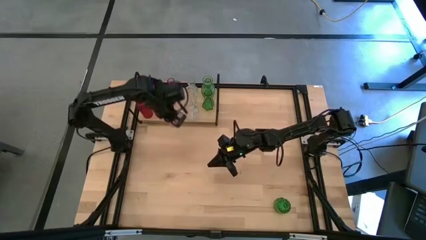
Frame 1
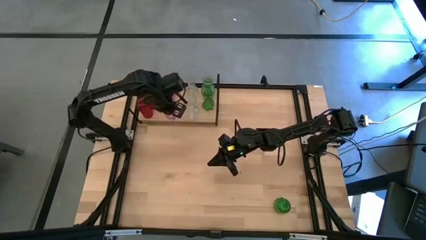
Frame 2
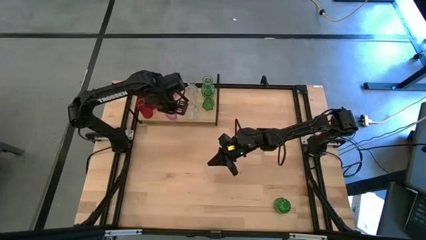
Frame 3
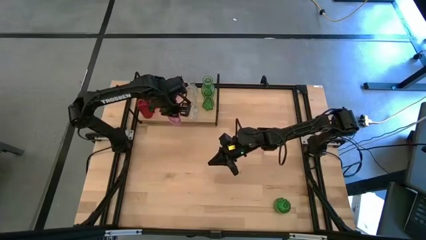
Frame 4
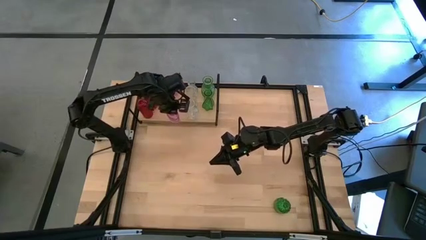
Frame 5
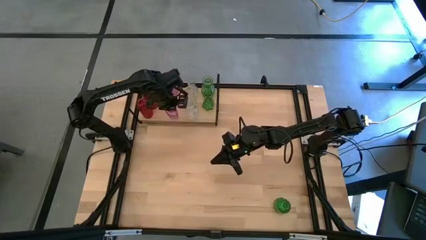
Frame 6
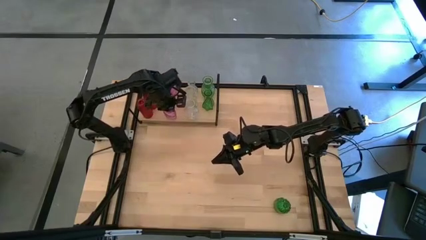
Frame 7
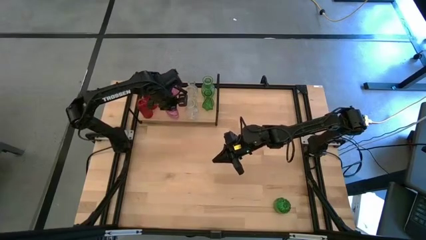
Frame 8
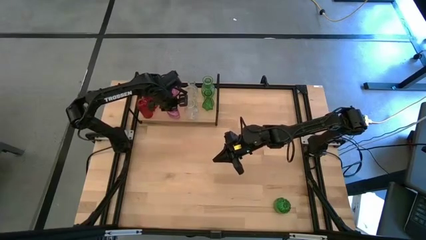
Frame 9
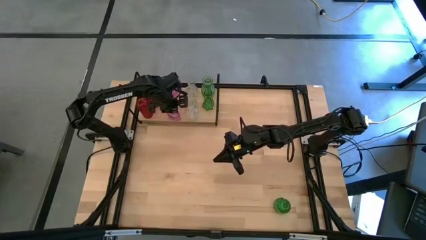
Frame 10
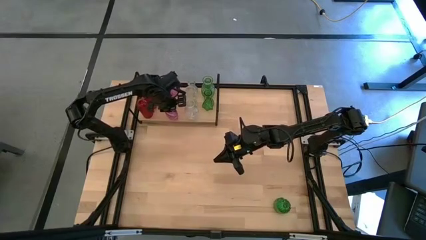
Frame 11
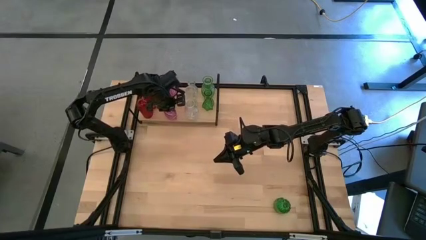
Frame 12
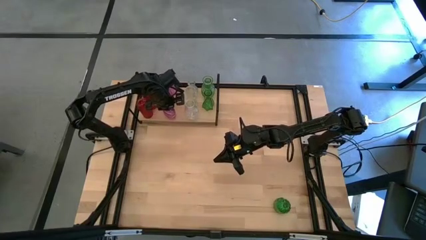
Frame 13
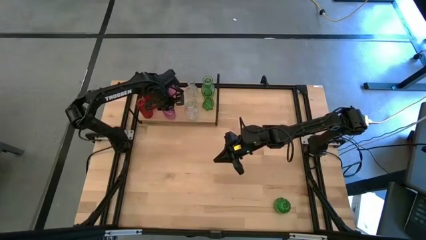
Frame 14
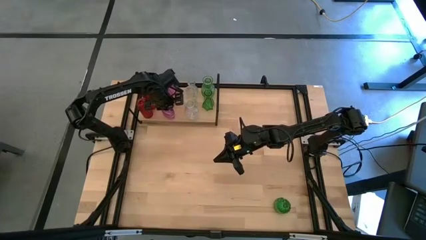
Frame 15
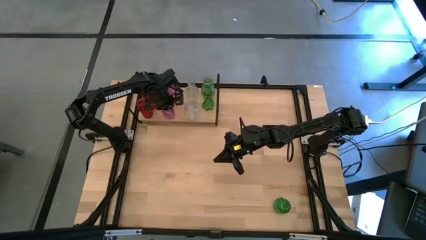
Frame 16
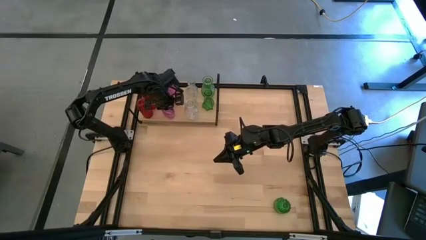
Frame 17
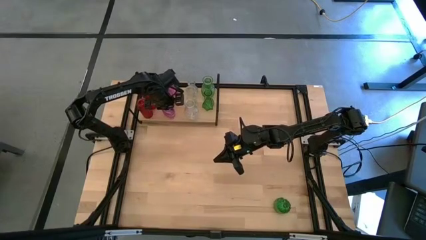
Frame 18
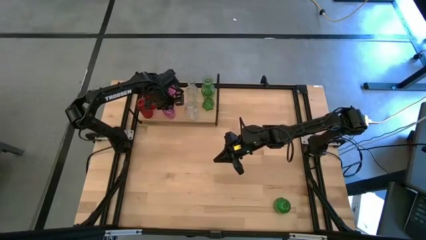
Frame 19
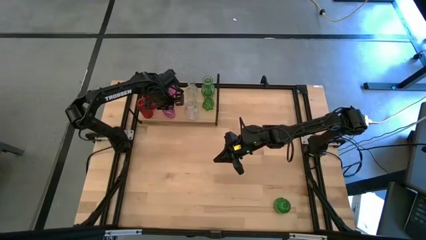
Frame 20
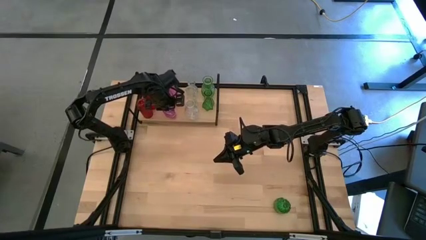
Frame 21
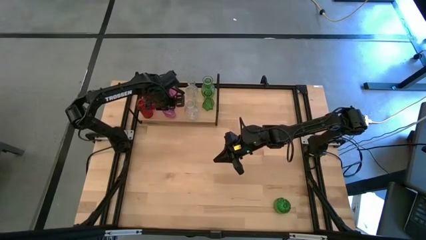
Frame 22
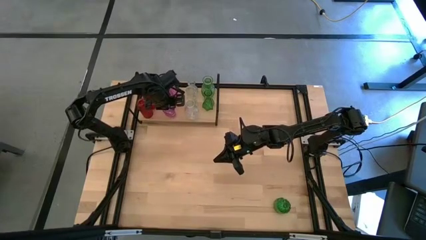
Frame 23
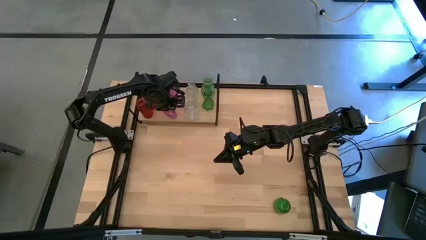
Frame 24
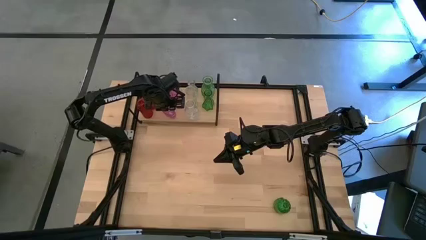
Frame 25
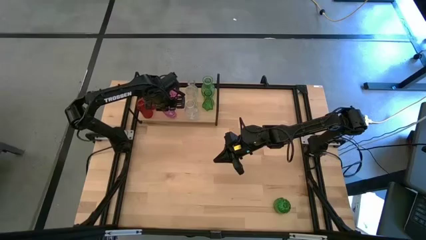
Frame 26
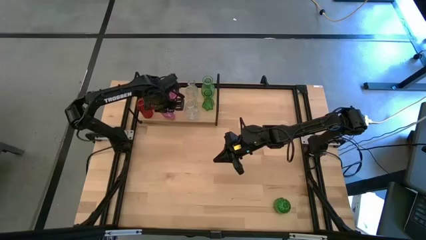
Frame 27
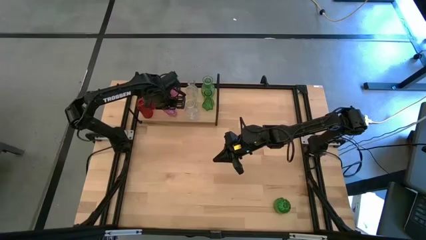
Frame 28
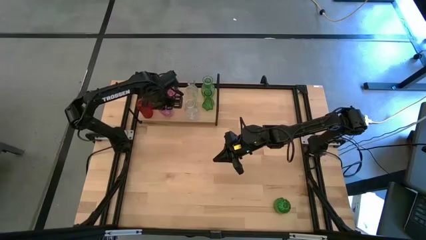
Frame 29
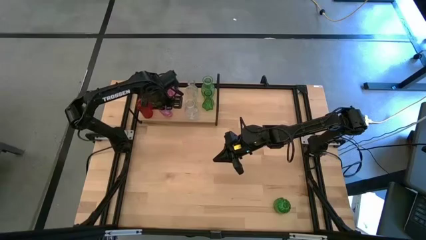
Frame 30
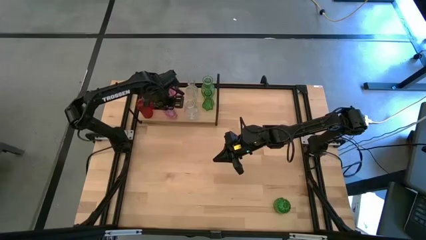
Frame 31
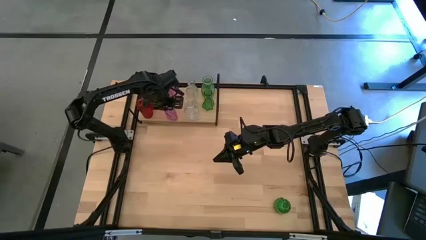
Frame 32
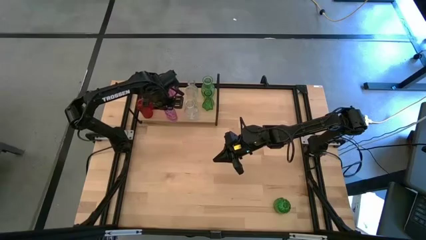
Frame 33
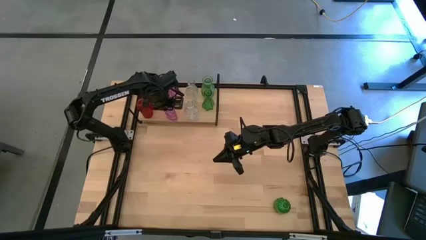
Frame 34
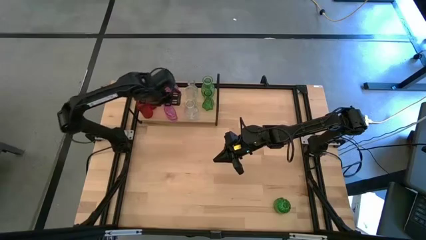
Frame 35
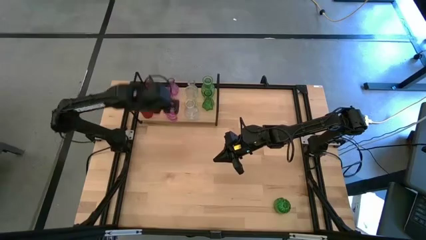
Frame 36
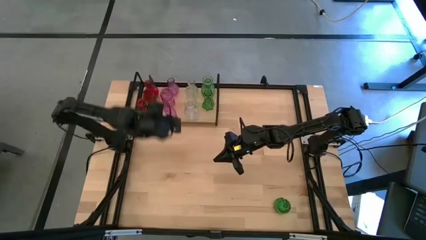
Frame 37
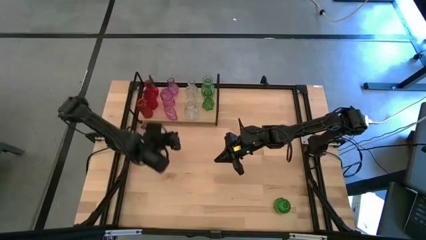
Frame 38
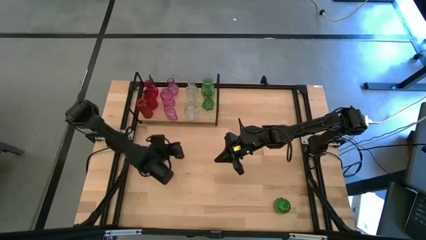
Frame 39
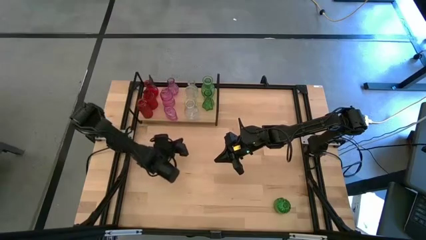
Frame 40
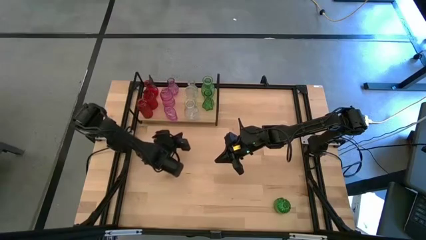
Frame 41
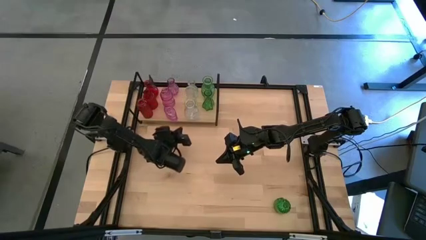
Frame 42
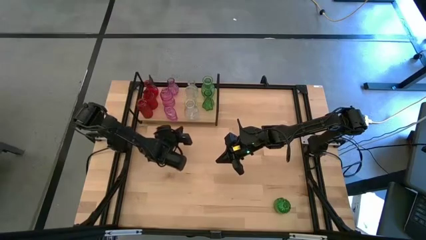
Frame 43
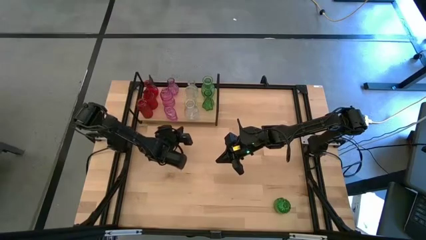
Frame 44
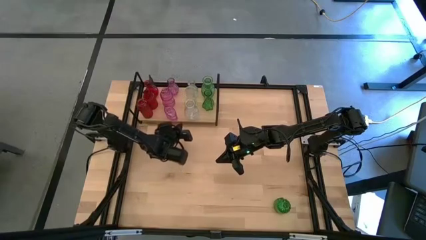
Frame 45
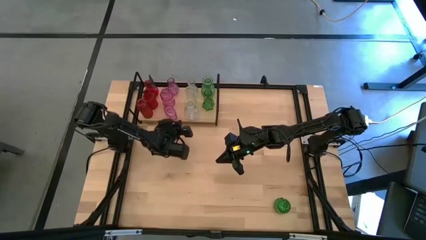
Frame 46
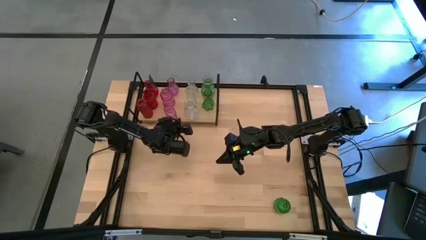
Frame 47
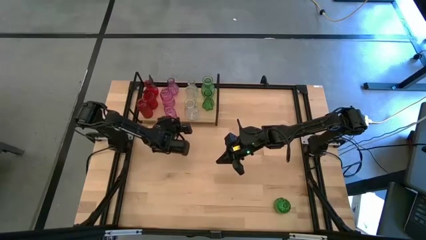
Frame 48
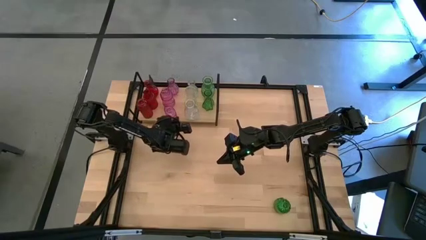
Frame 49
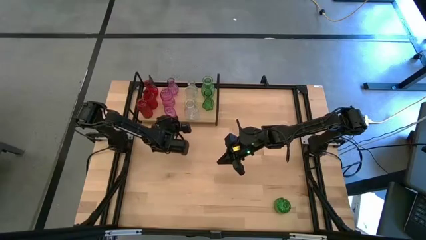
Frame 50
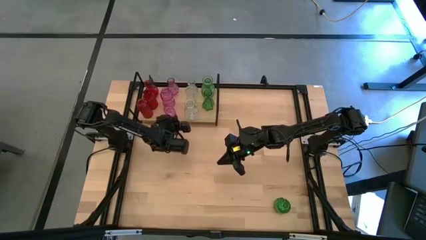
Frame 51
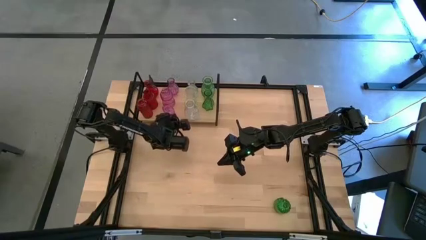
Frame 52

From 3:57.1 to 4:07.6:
Task: sort vases onto shelf
Put the purple vase on the shelf aligned with the other purple vases

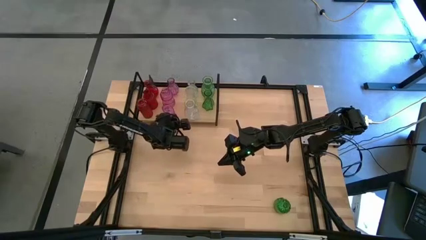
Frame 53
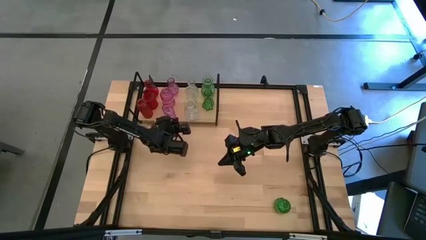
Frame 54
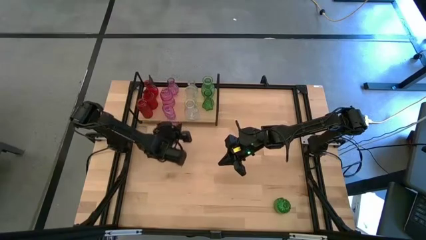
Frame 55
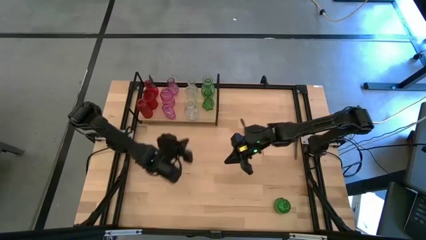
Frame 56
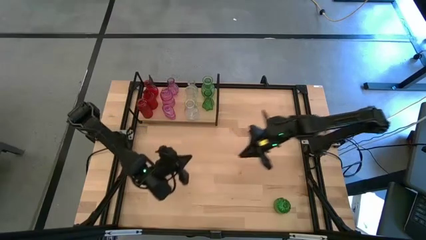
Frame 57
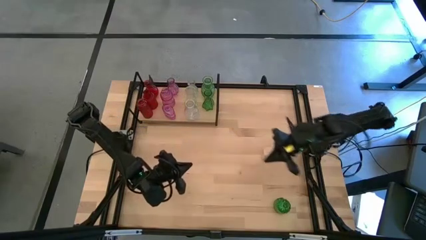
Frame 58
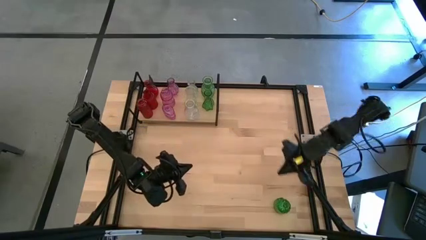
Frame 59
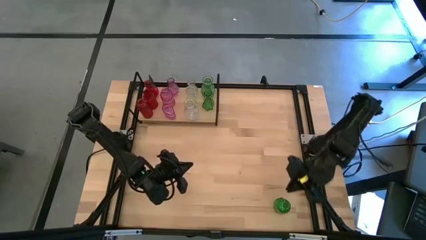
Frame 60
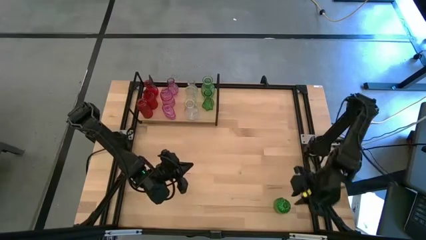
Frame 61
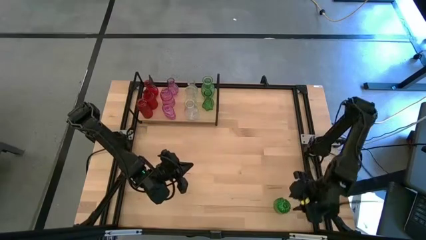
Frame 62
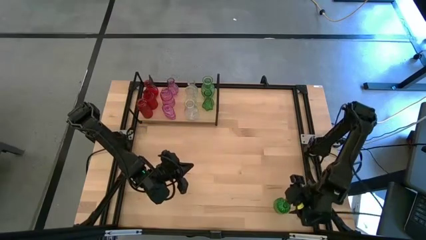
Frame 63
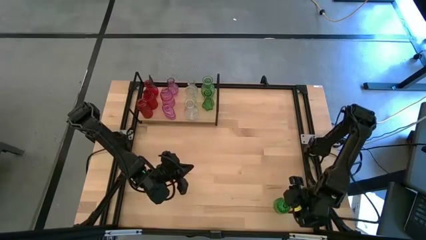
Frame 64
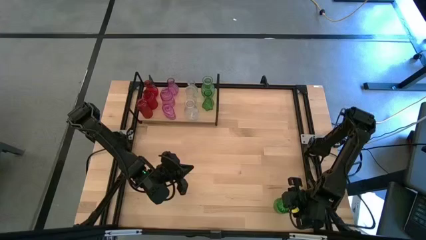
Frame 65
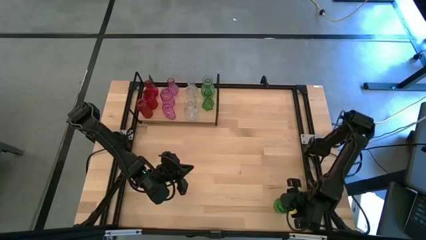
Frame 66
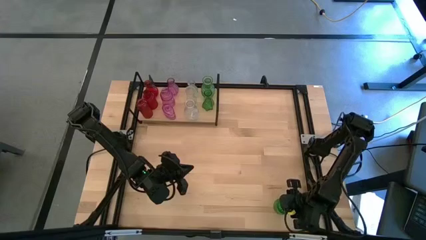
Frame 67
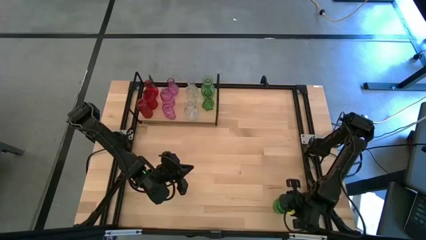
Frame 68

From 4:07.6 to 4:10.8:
Put the green vase on the shelf aligned with the other green vases

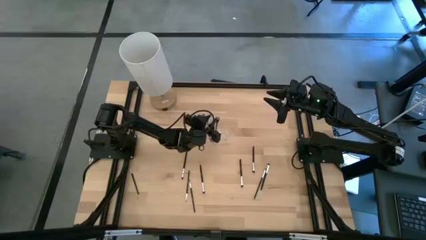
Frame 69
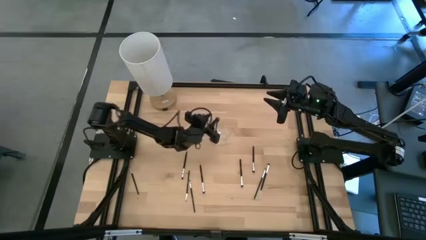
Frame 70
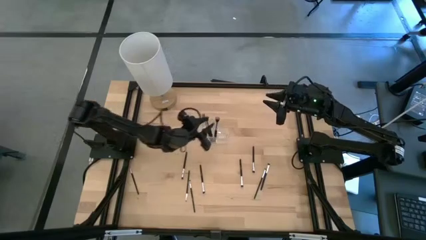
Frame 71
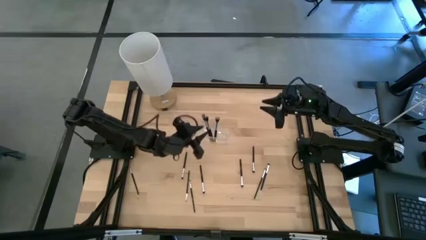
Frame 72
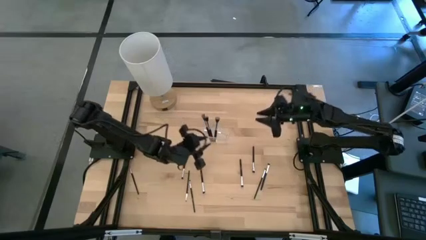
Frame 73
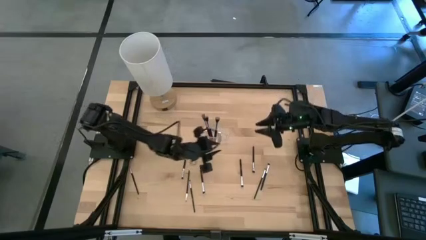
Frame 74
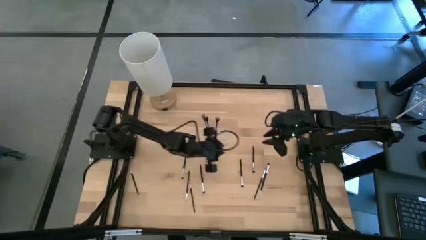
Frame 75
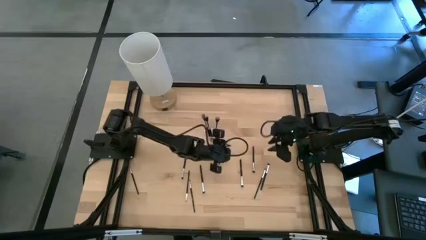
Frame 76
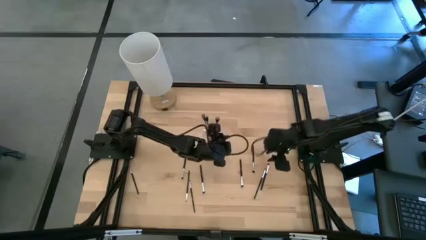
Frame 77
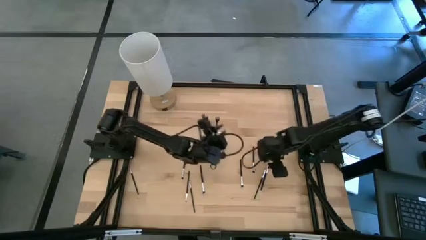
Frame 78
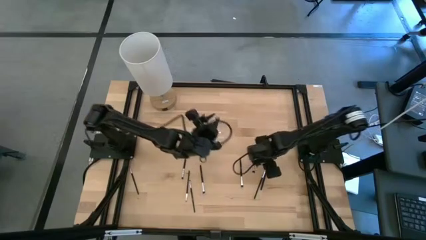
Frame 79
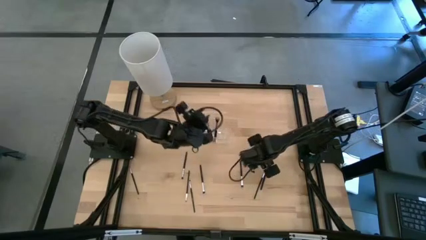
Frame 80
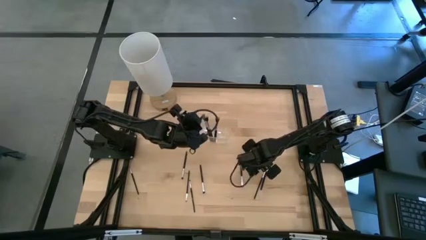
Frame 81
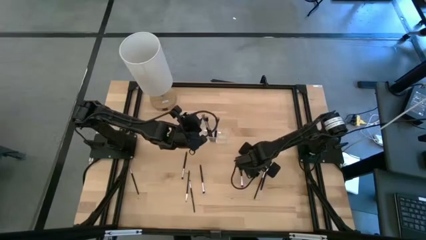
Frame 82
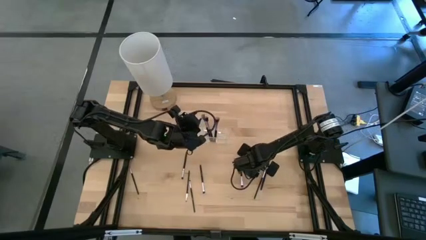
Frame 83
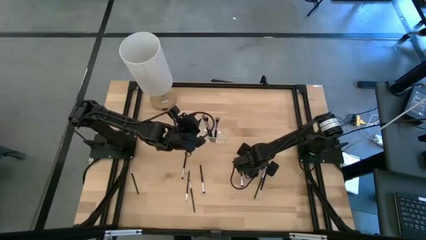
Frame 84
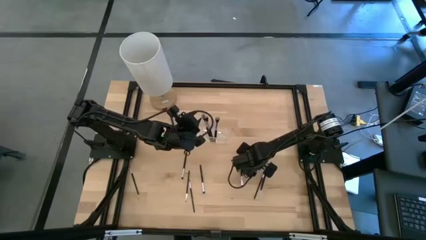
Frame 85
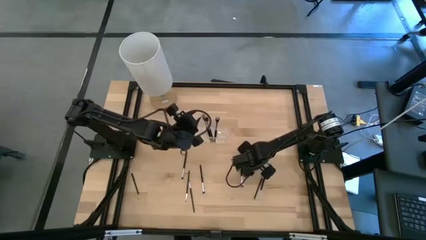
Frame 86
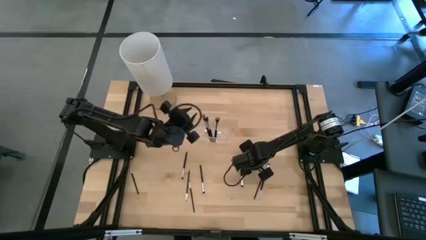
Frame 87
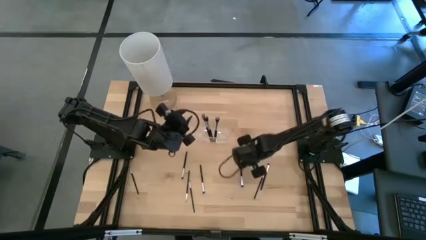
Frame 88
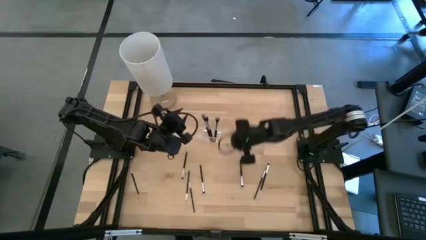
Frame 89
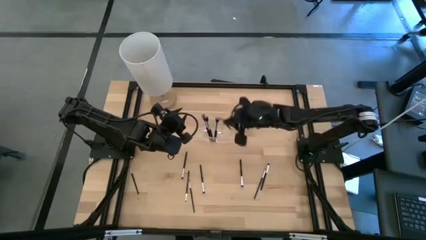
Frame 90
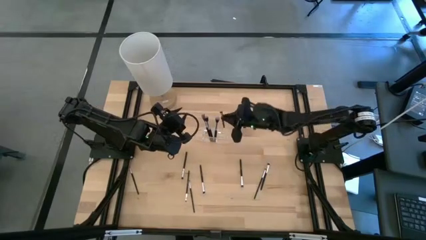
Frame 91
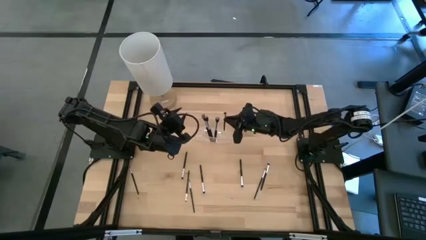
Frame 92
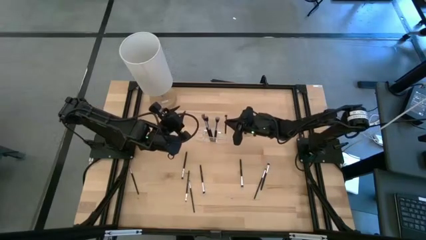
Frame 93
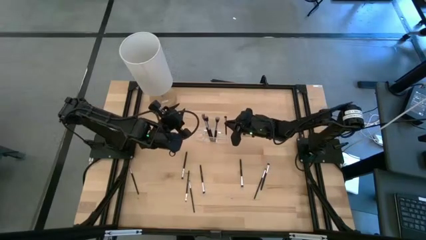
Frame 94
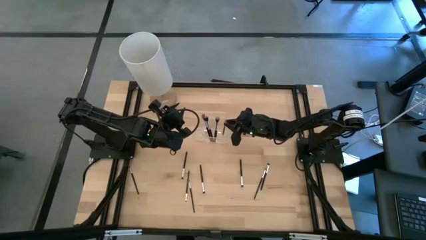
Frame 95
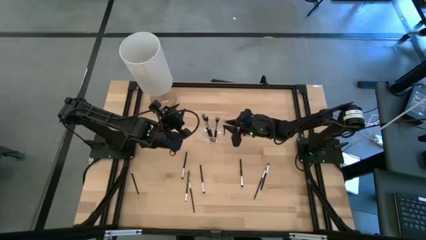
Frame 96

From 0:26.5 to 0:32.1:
Task: Put items in baskets/containers
Put the black eyeshadow brush into the transparent organizer
